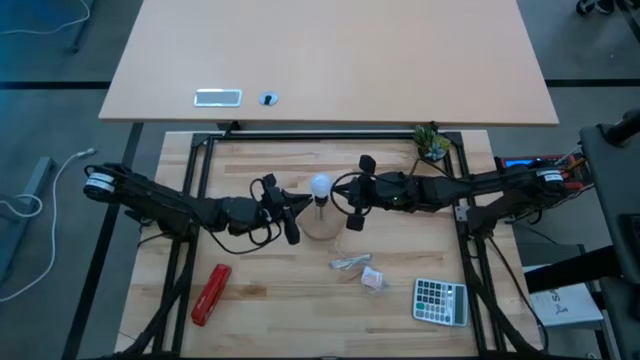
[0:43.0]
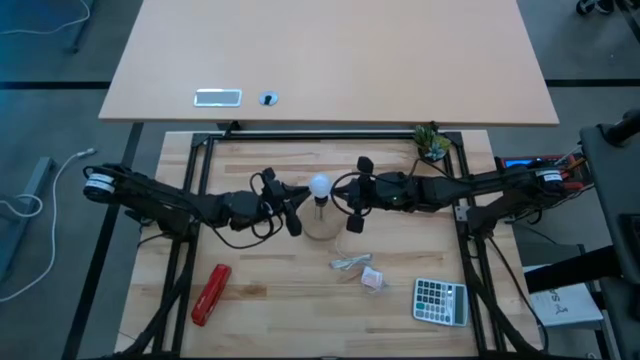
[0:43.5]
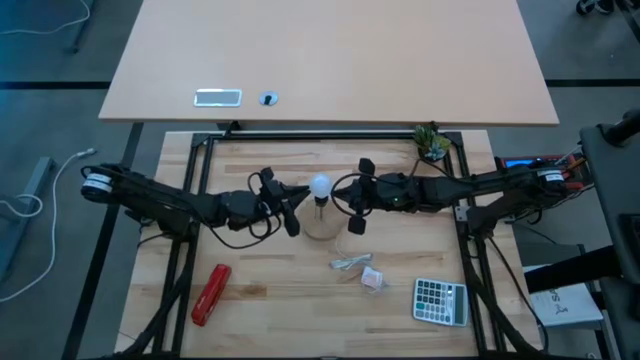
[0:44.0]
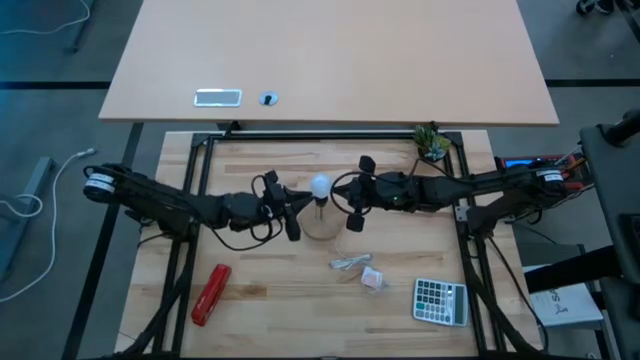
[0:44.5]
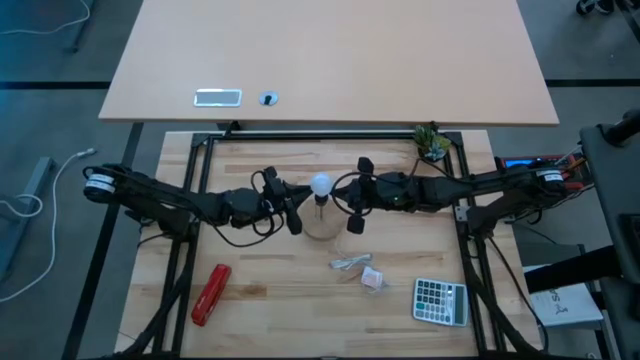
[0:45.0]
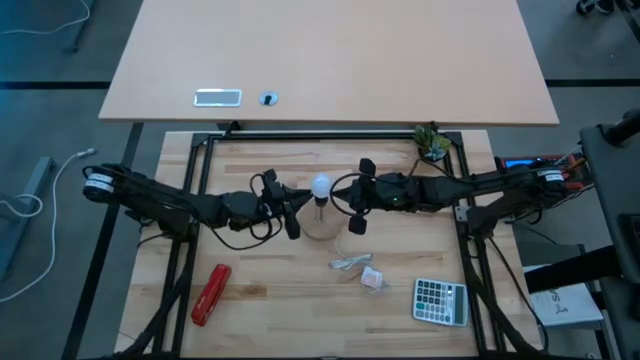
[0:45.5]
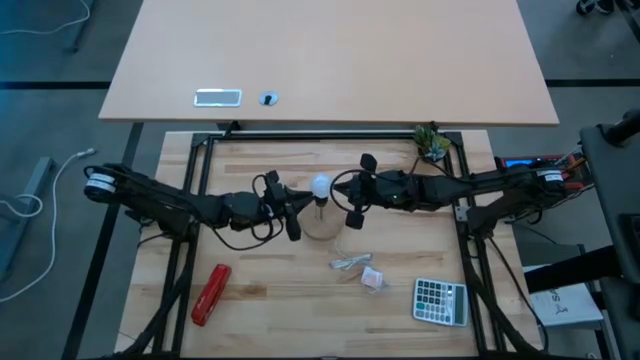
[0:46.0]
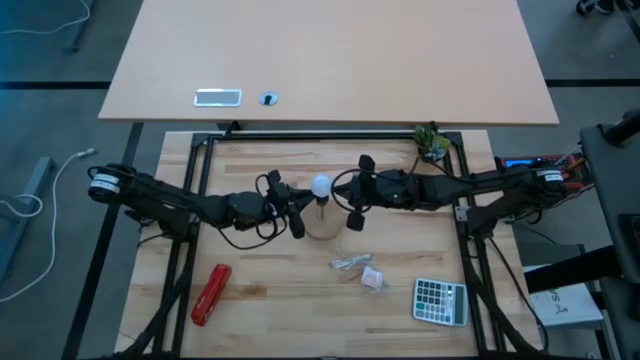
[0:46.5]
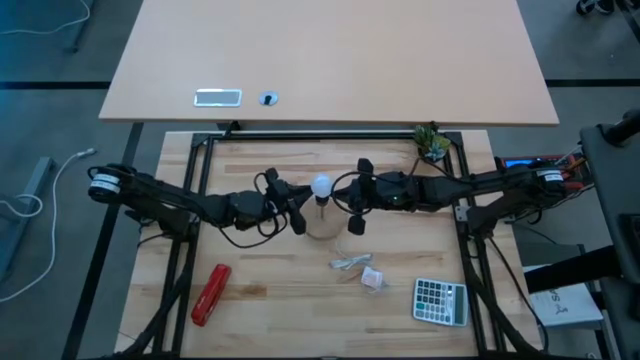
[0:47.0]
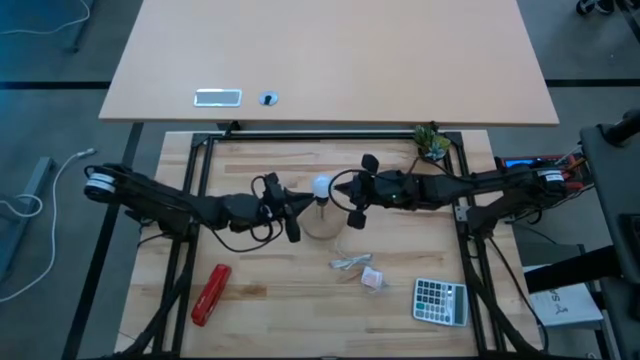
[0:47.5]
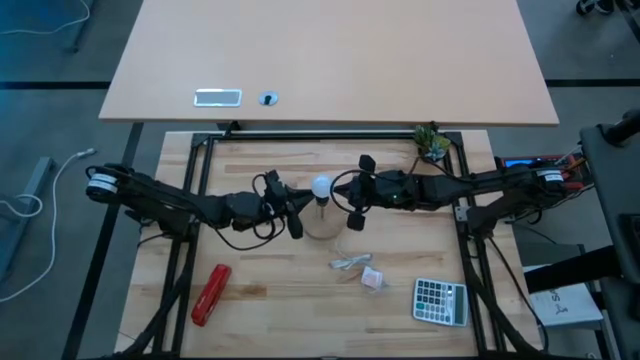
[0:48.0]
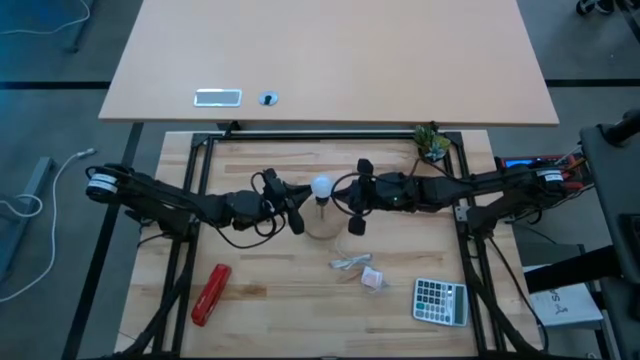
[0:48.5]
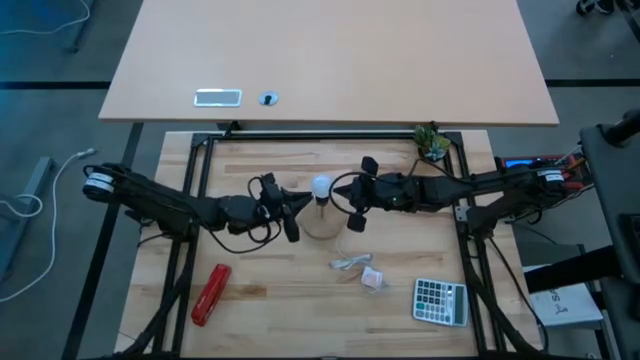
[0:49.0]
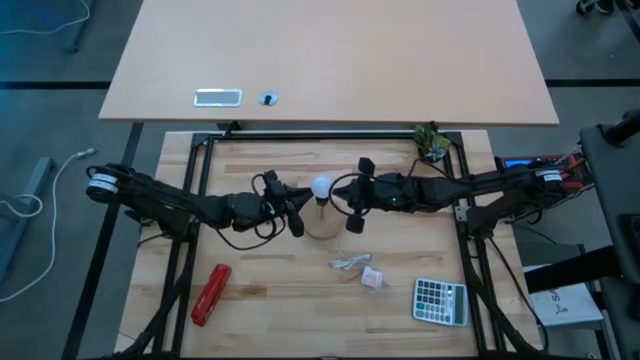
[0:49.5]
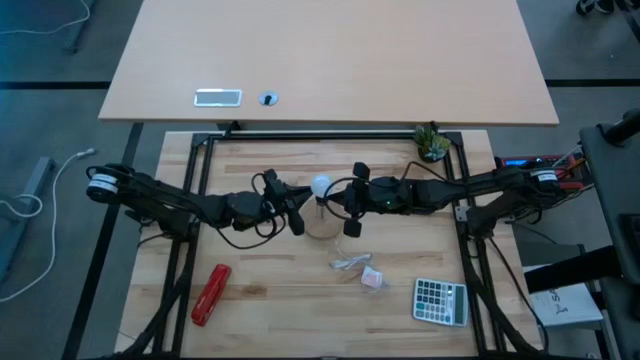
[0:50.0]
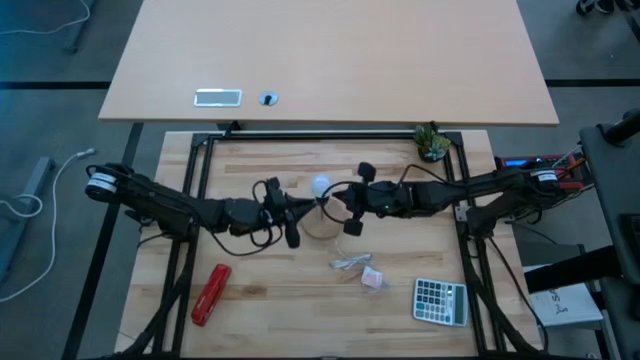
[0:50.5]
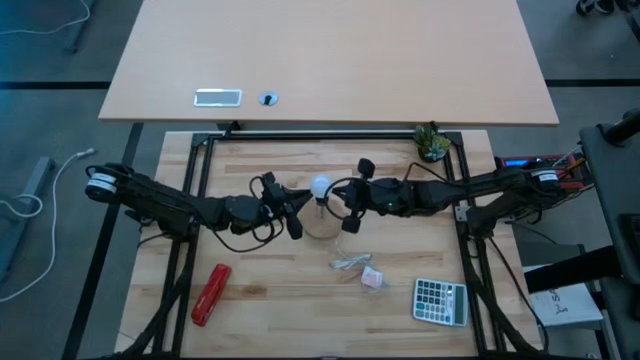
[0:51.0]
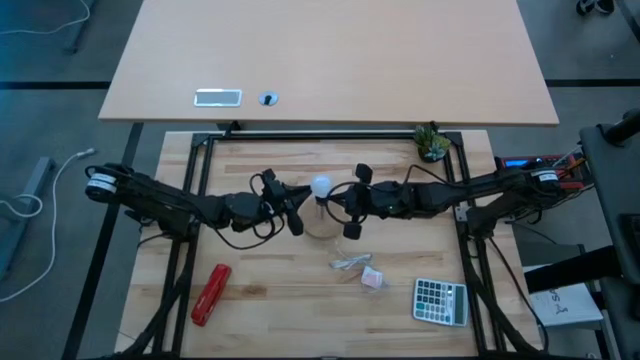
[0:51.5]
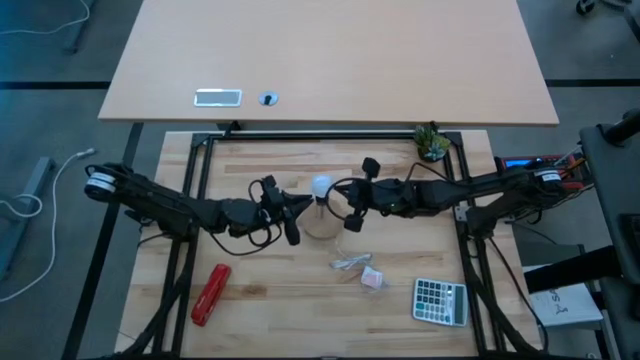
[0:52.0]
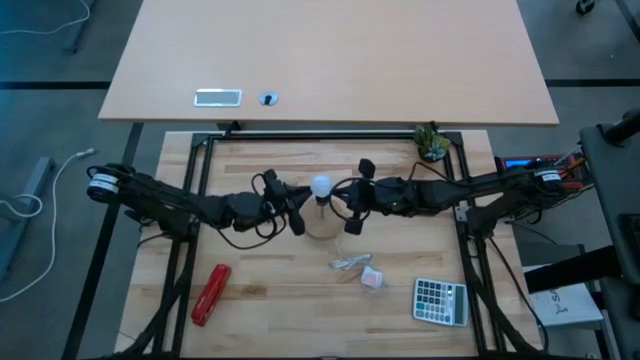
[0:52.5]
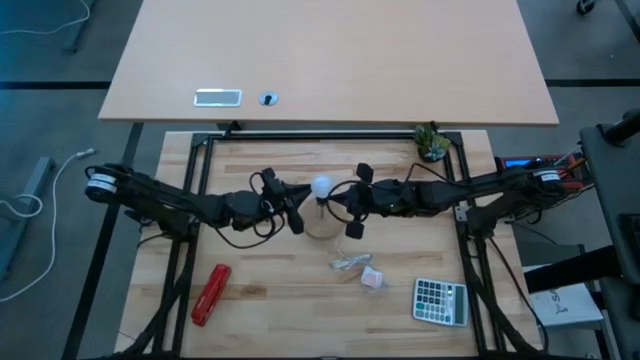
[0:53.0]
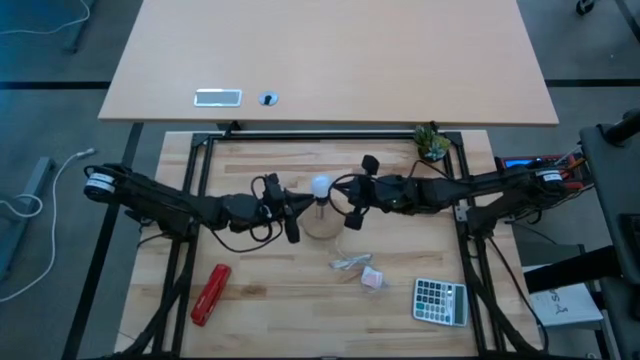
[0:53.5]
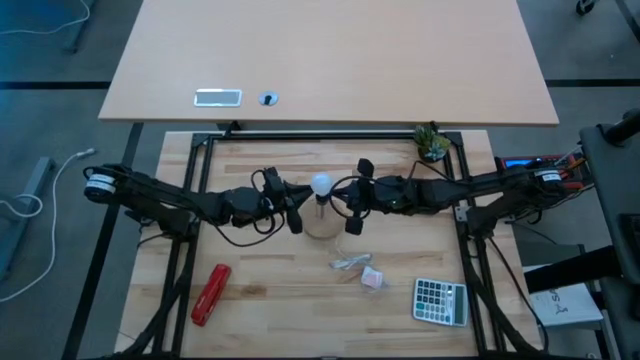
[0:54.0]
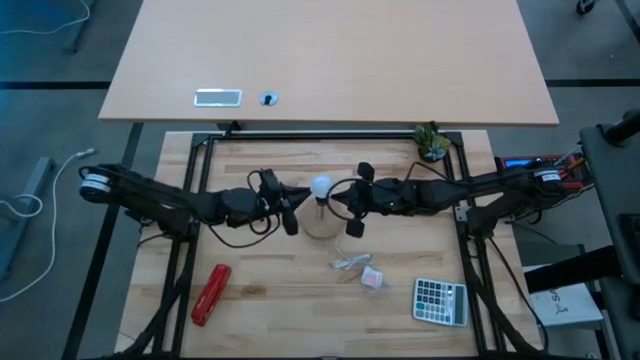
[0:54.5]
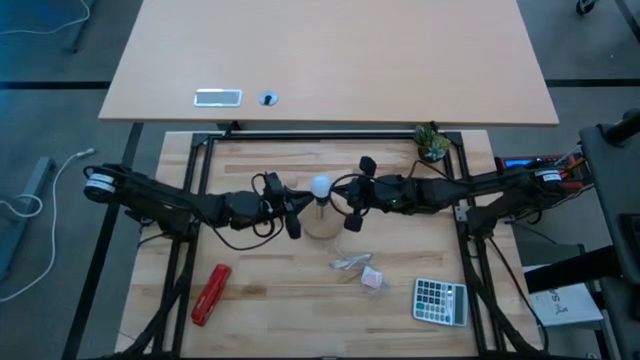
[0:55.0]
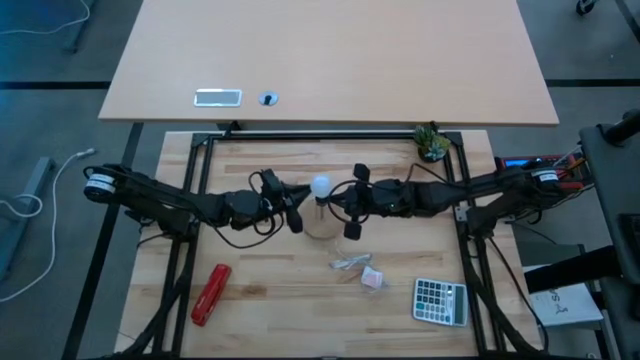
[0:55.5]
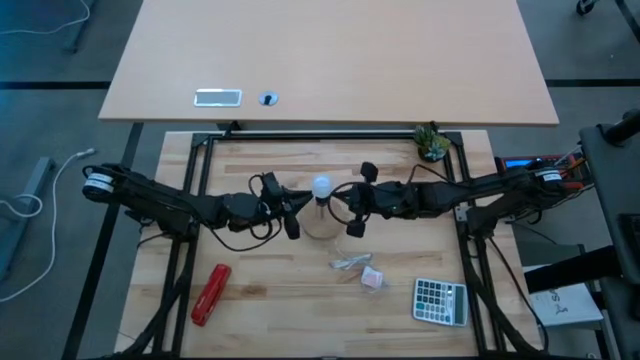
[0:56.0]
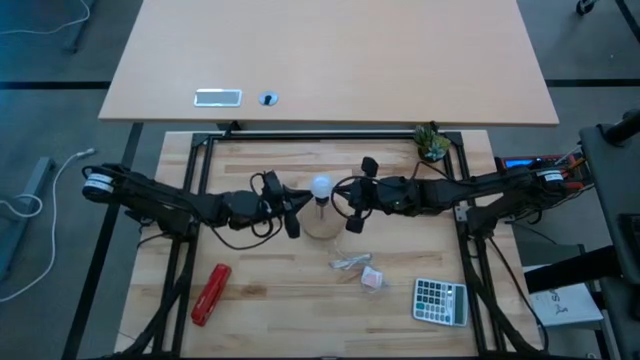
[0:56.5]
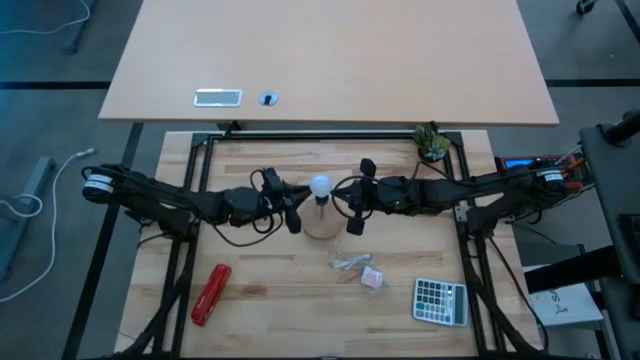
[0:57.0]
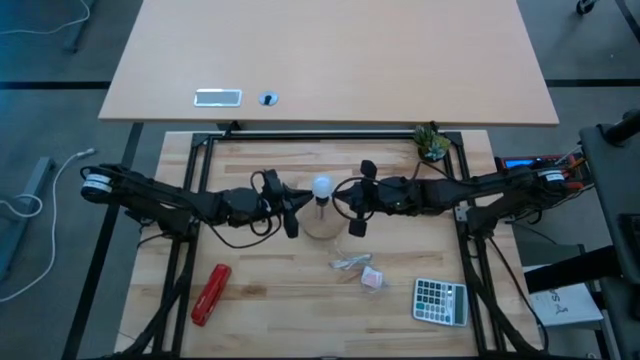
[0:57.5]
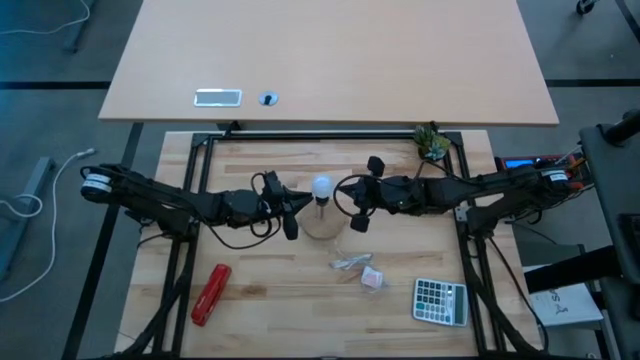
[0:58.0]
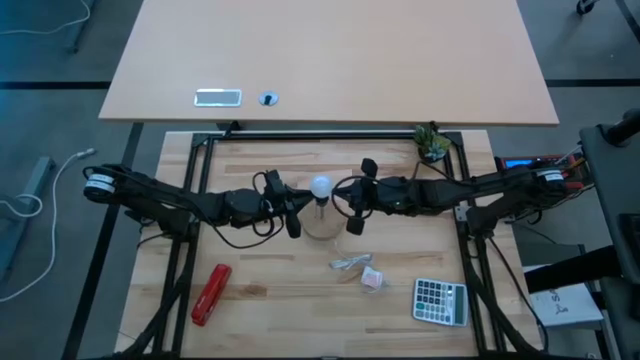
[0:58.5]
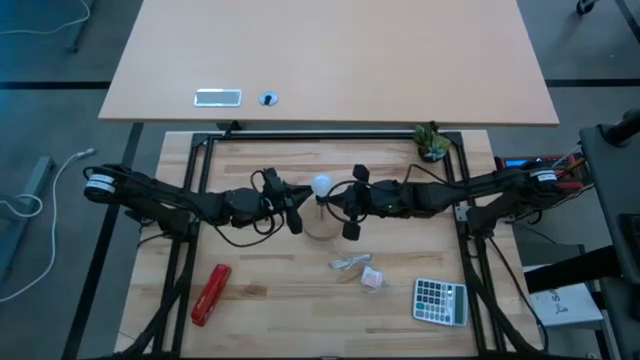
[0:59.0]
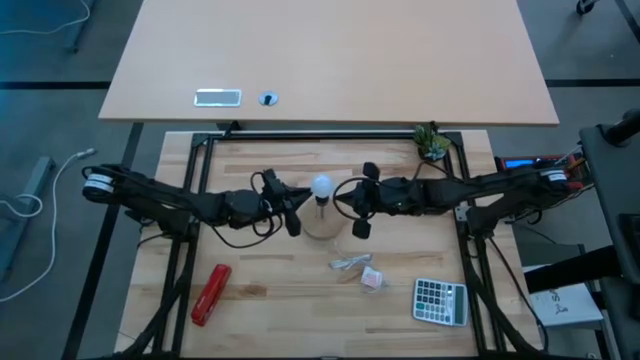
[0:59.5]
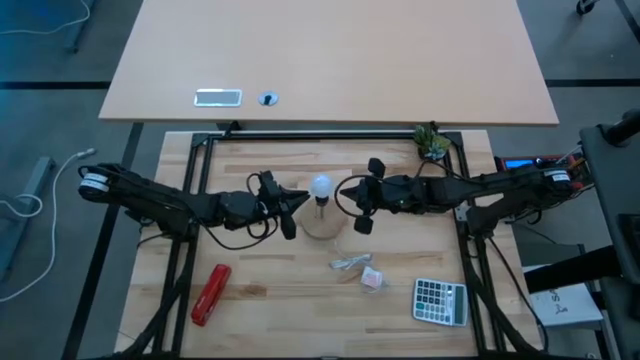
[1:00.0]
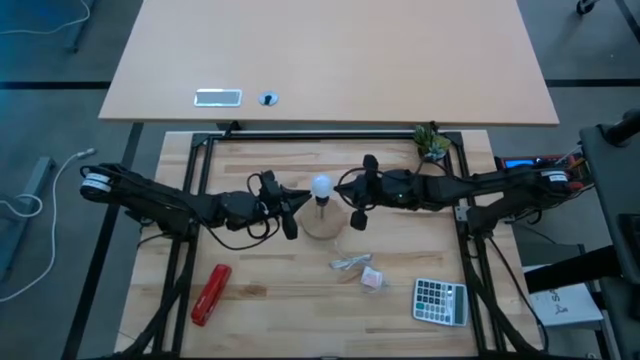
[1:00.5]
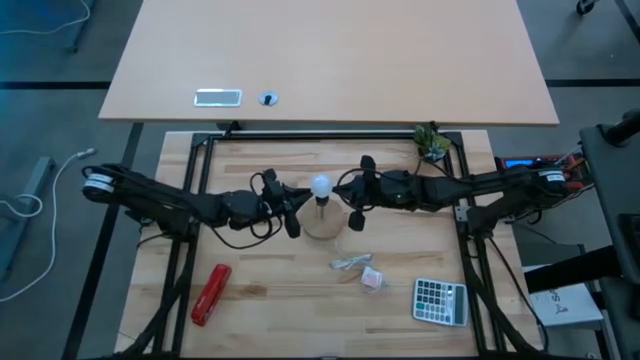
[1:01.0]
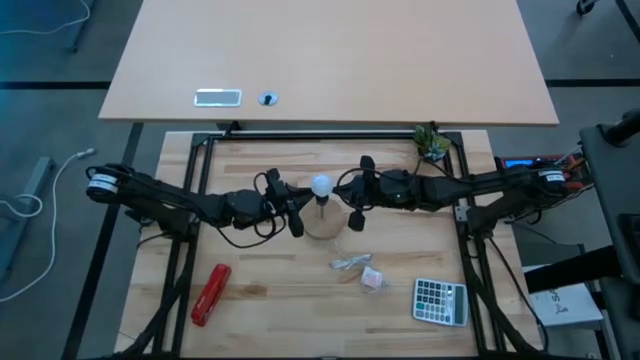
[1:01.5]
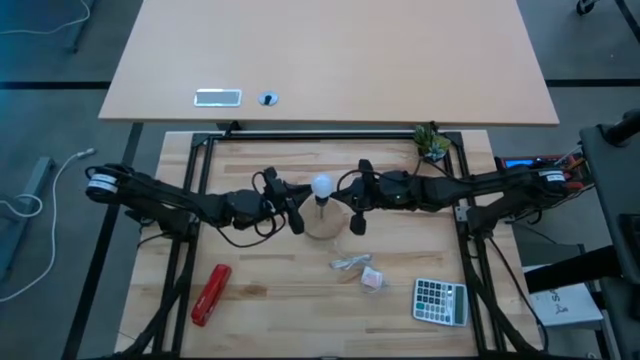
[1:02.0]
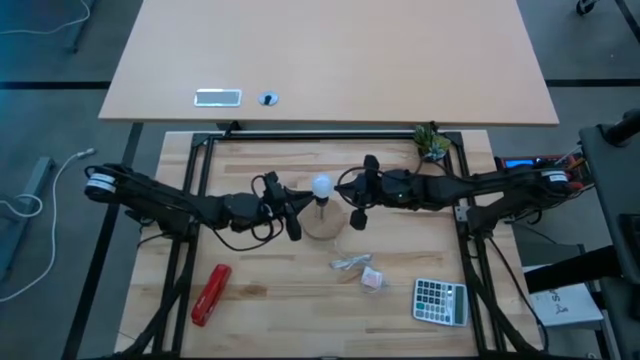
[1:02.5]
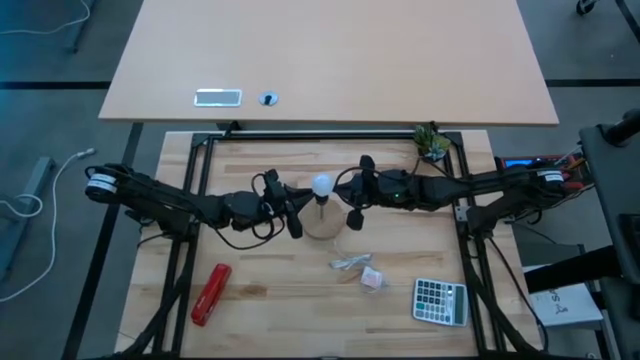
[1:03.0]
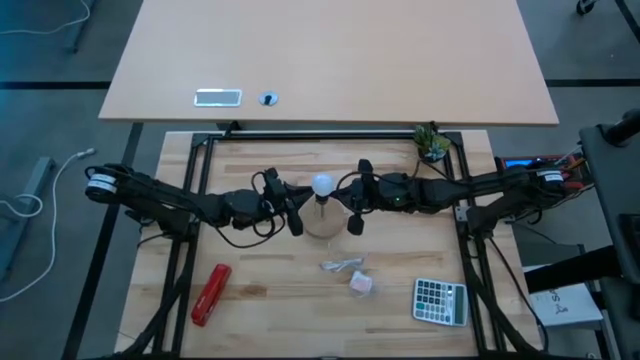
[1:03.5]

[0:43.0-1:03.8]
Task: Screw lightbulb
Insert the lightbulb into the lamp
